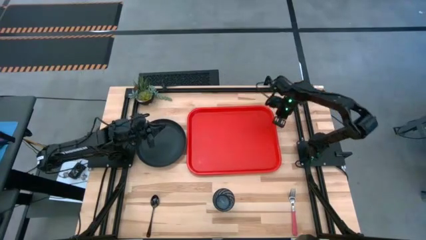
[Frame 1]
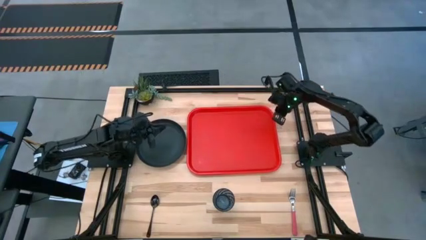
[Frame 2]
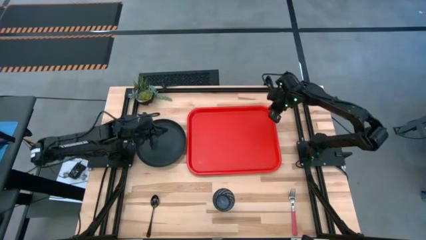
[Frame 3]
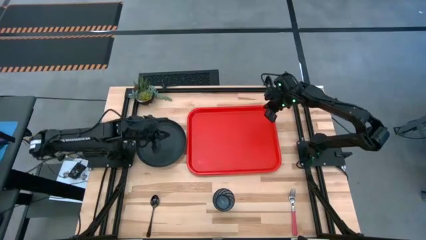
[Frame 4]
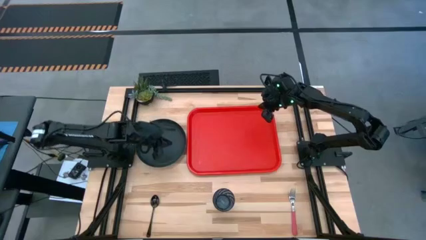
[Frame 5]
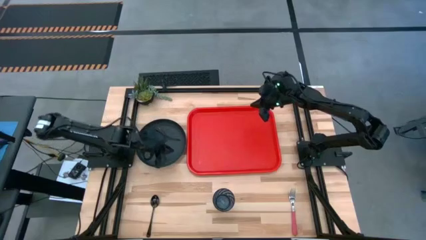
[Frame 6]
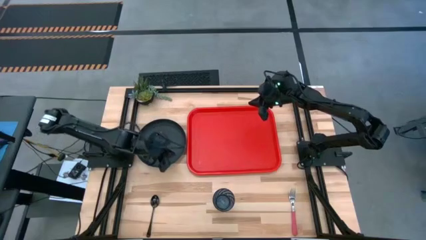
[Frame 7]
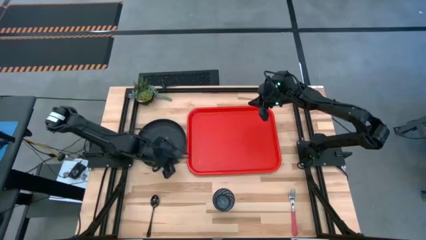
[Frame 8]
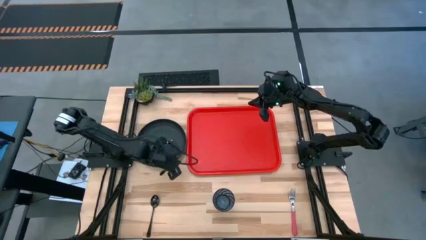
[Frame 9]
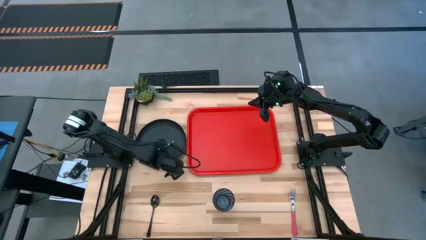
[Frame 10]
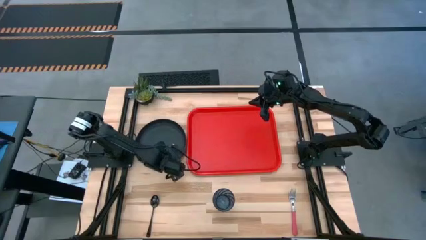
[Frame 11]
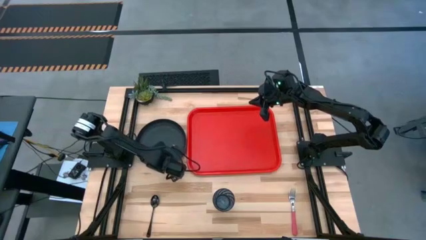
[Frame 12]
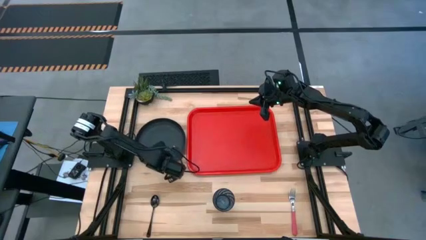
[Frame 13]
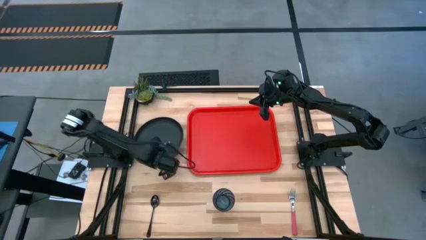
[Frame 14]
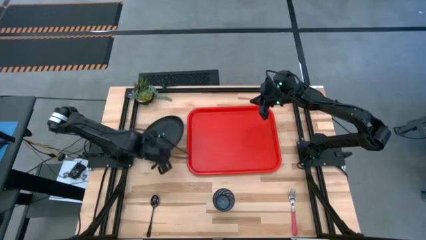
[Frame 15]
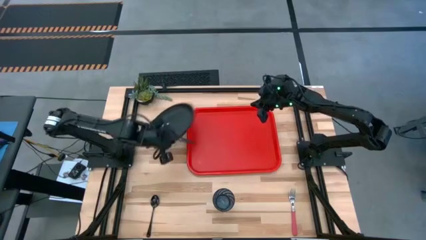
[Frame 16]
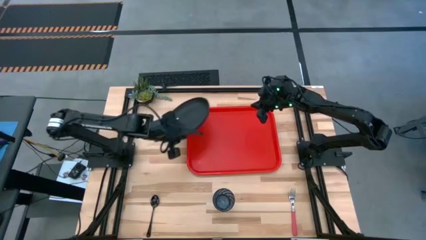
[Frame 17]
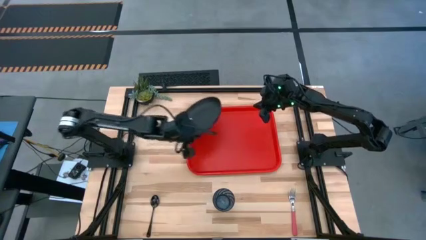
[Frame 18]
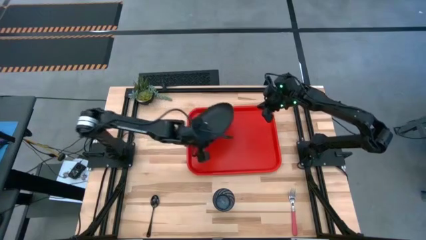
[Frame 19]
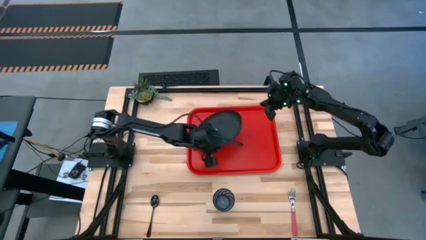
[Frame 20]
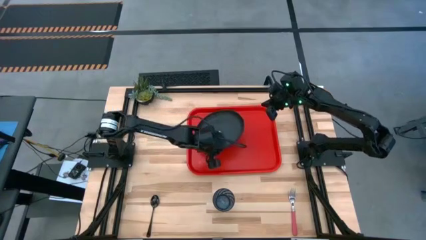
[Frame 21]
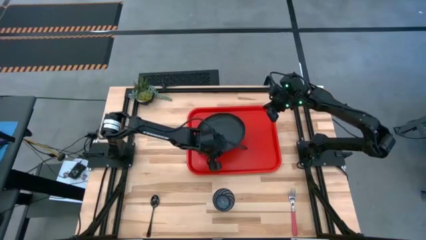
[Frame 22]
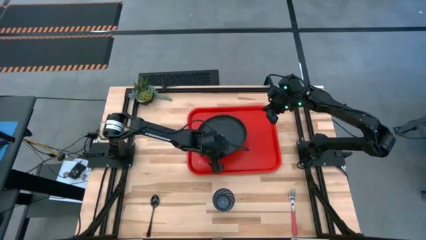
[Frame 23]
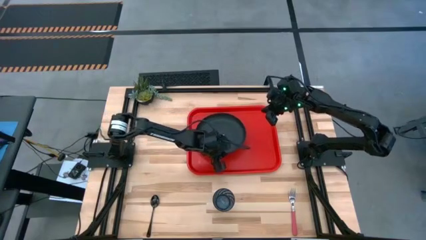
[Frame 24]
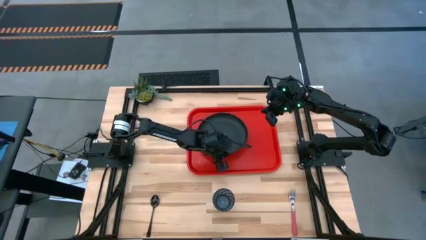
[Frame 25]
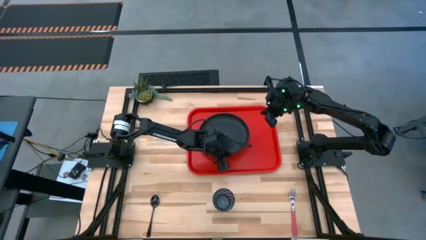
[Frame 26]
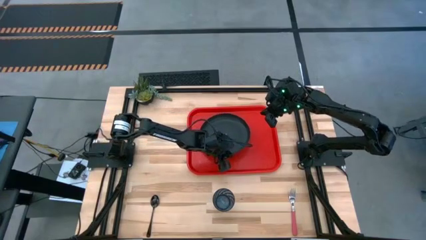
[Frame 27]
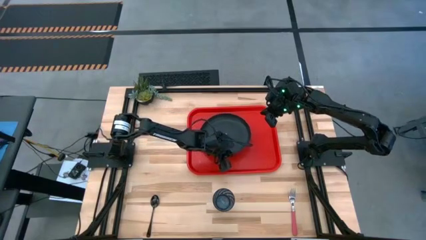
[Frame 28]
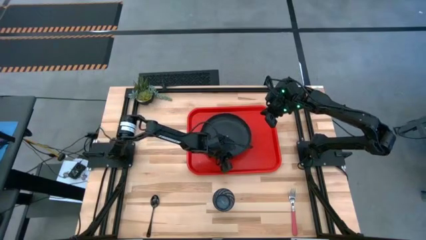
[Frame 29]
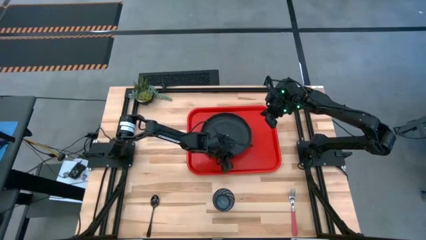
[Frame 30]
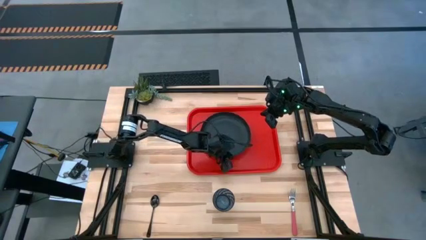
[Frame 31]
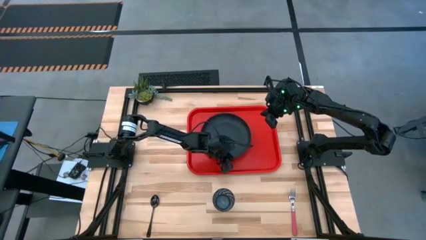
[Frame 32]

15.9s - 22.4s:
Task: Pick and place plate/cup/fork/spoon on tray
Put the black plate in the center of the red serving tray

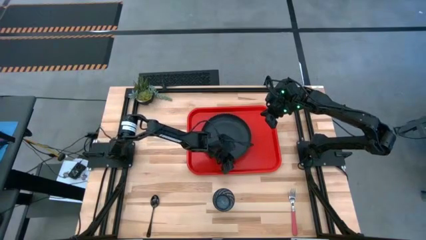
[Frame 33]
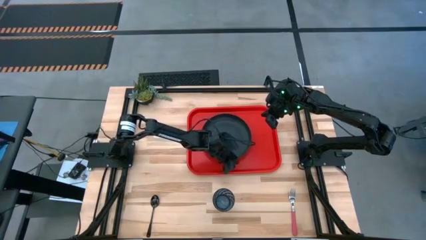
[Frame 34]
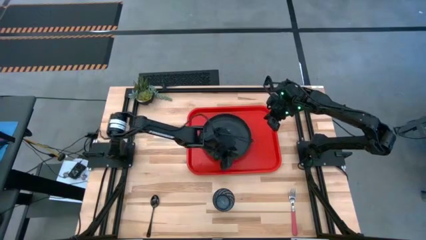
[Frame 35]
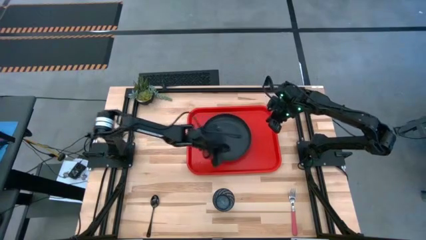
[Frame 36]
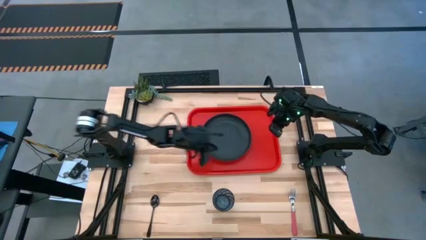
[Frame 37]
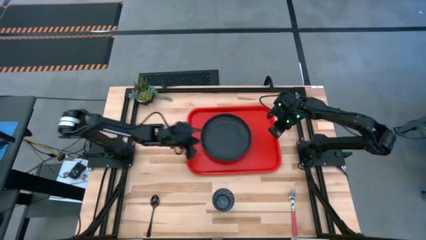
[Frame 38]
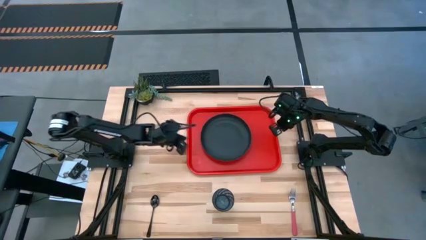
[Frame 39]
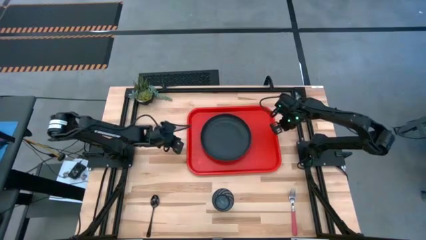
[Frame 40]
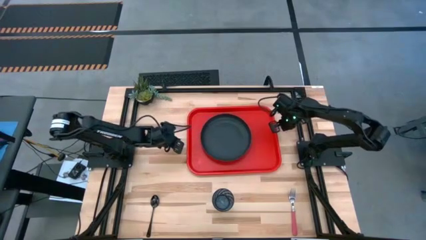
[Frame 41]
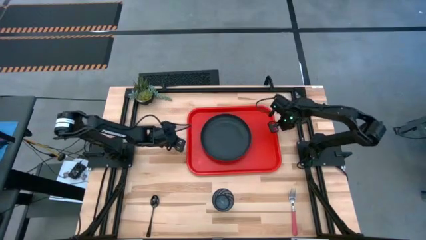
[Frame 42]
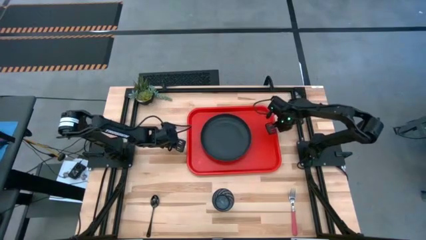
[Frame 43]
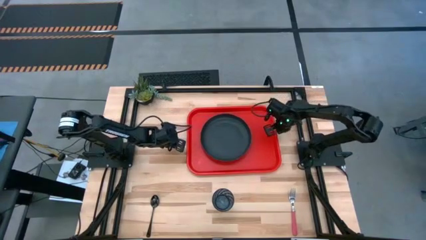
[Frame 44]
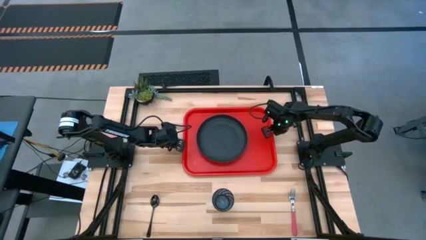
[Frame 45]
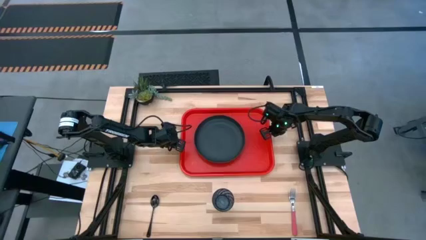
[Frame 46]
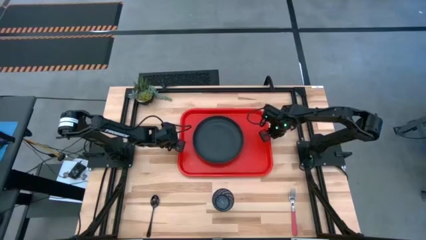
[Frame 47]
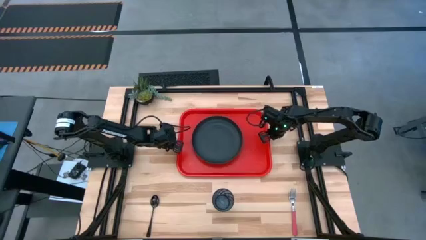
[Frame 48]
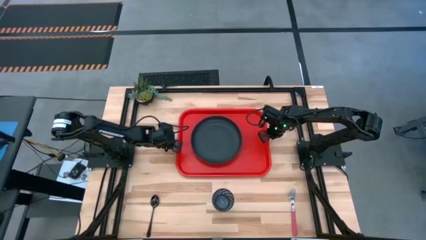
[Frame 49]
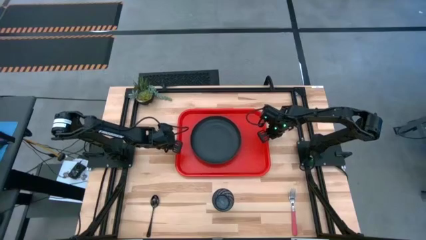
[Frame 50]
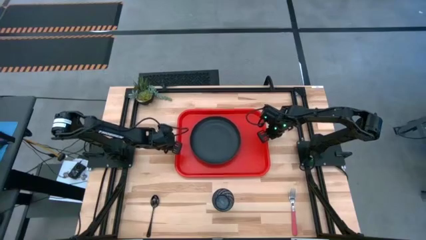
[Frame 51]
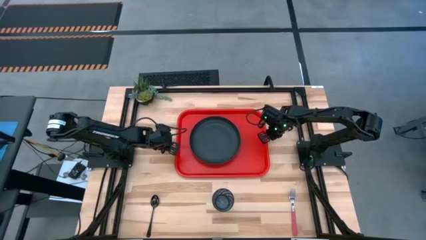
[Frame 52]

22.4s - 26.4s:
Adjust the red serving tray on the table

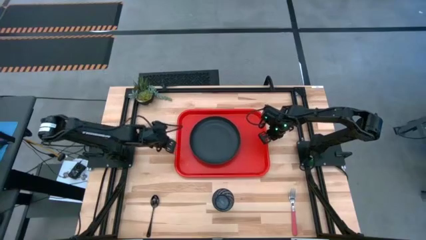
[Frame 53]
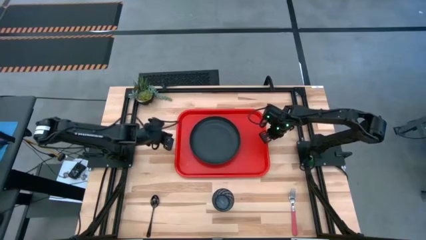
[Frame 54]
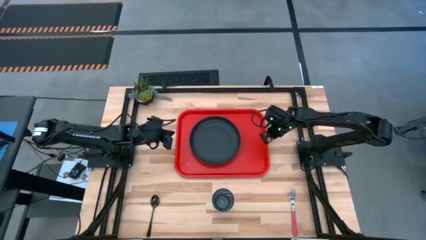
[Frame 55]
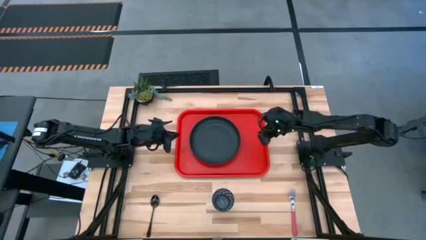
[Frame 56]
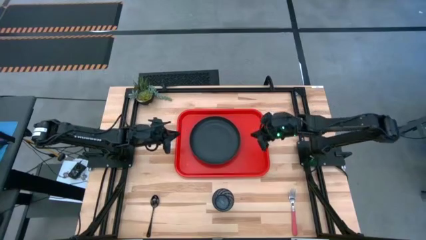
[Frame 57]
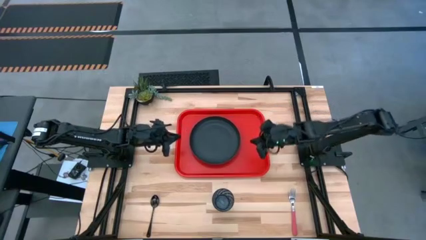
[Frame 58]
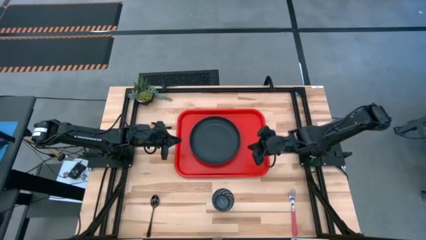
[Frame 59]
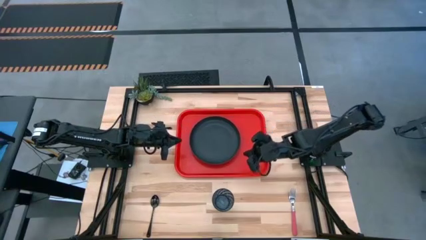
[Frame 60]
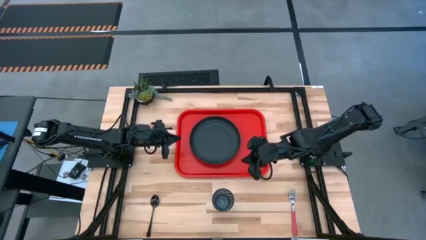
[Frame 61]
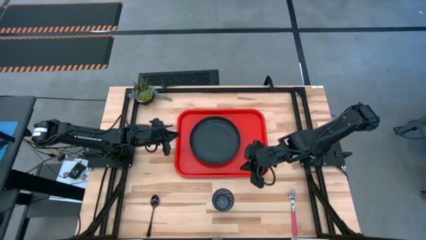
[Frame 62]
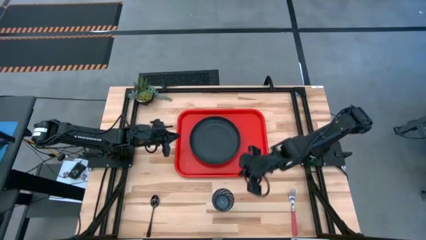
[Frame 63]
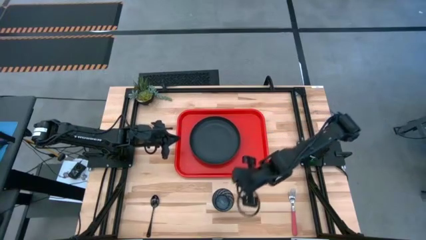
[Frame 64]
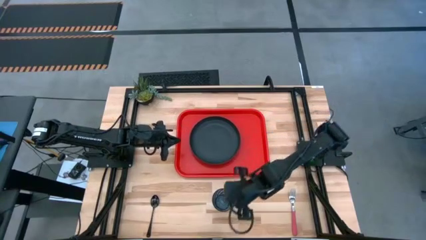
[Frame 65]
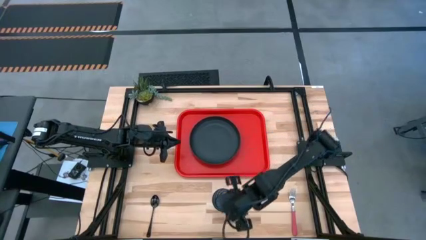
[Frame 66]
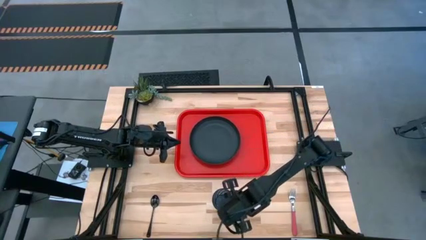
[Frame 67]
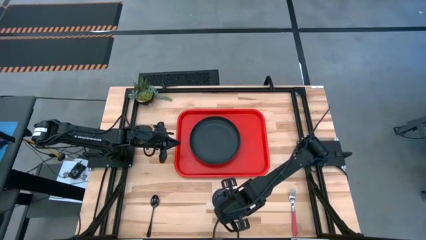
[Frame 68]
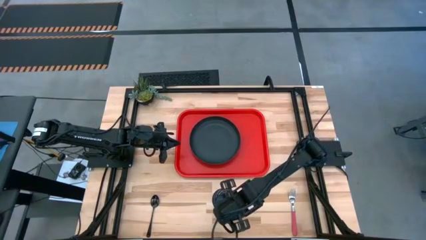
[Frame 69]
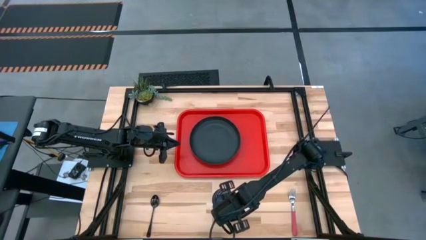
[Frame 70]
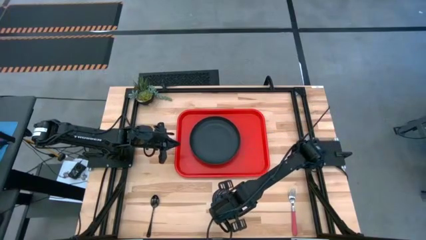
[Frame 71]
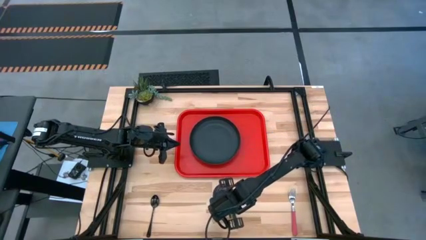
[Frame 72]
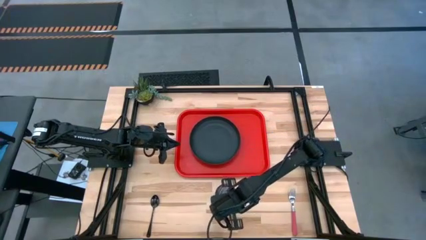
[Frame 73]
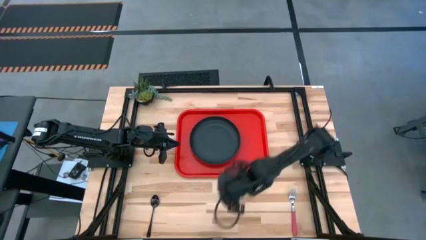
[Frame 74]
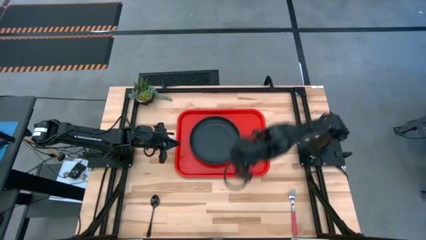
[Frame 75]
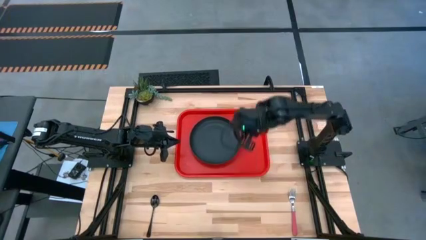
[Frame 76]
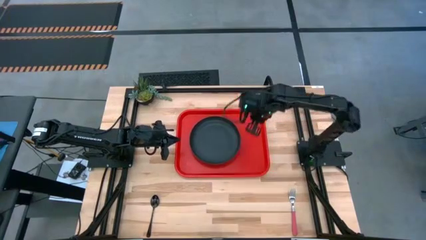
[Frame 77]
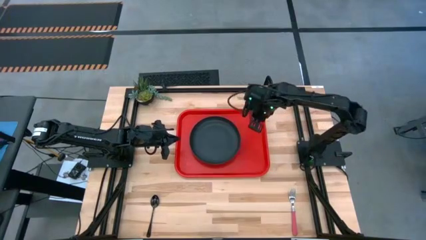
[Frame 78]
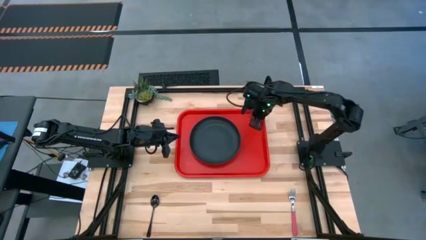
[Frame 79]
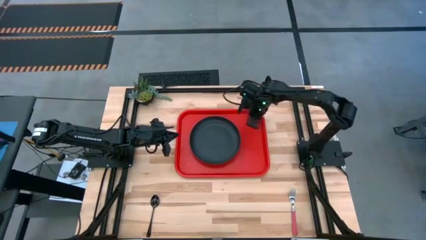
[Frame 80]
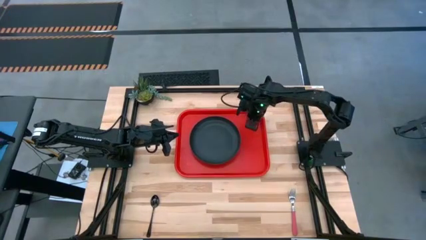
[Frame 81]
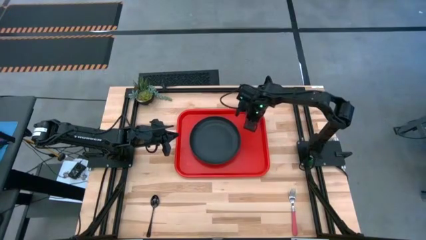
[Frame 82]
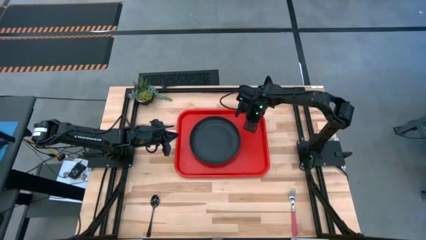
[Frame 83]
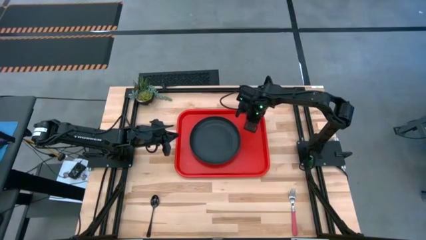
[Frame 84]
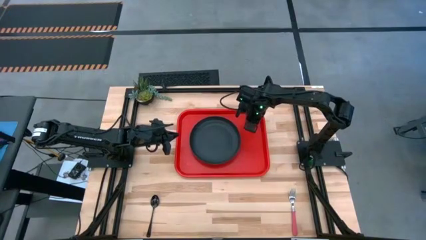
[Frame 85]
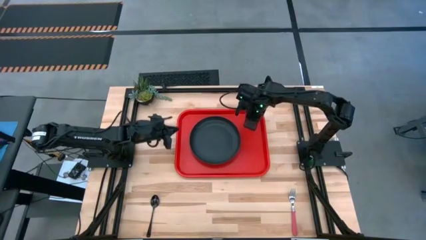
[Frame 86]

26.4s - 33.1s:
Put the blue glass on the red serving tray to the top right of the black plate
